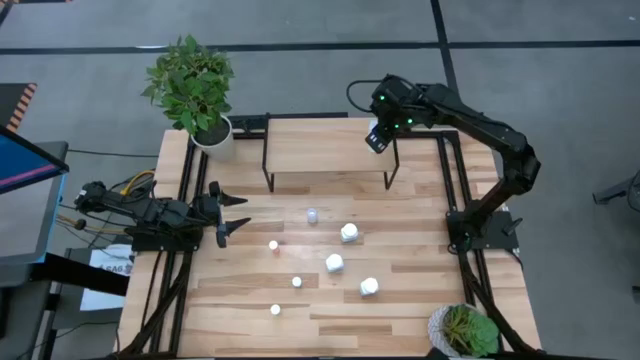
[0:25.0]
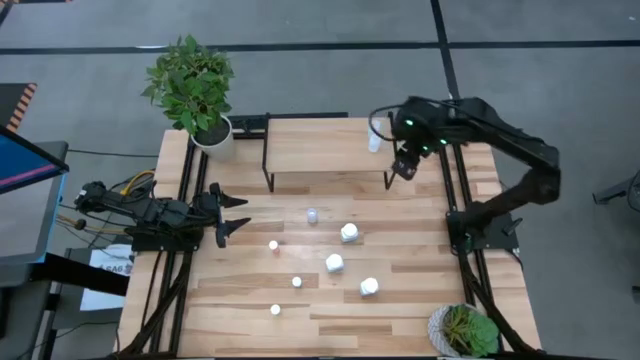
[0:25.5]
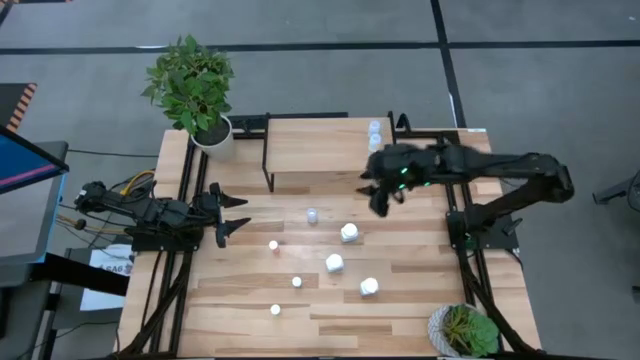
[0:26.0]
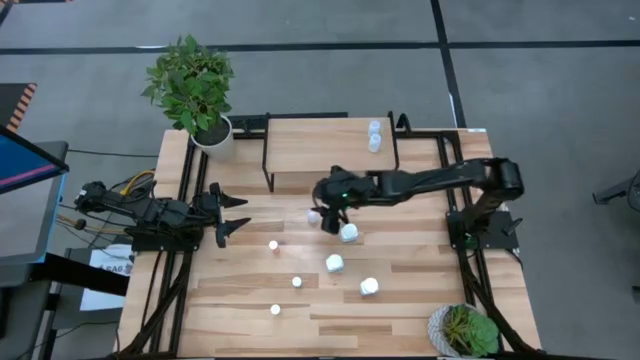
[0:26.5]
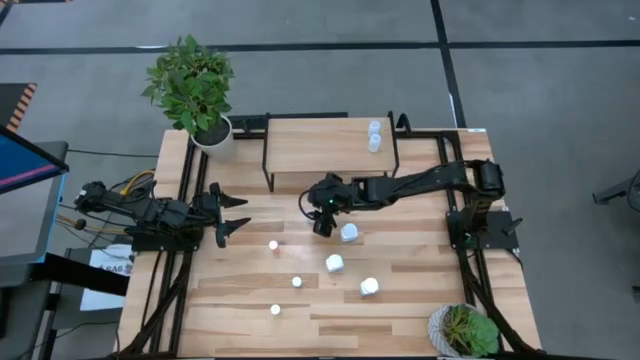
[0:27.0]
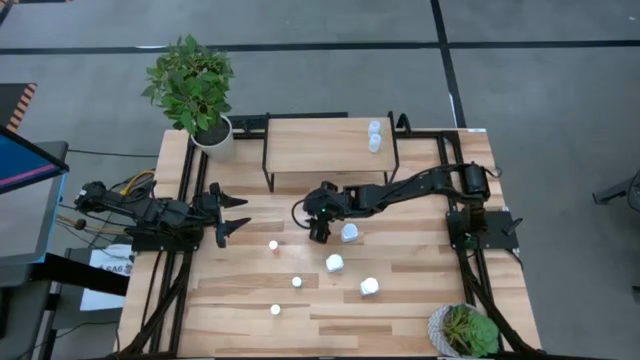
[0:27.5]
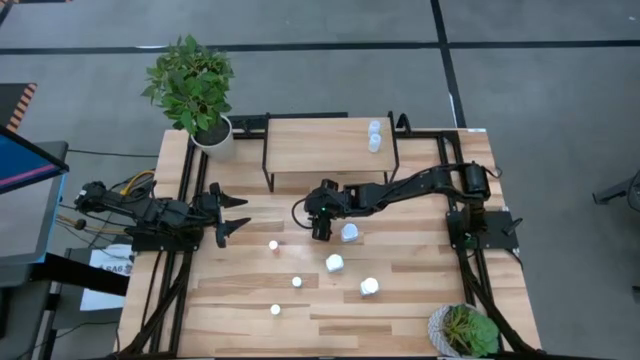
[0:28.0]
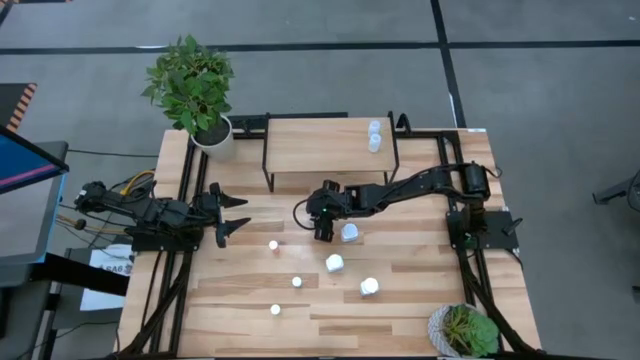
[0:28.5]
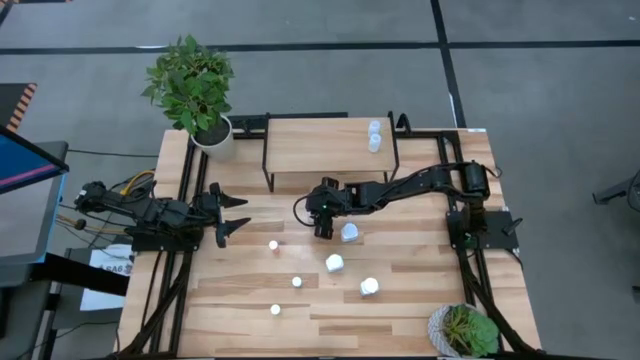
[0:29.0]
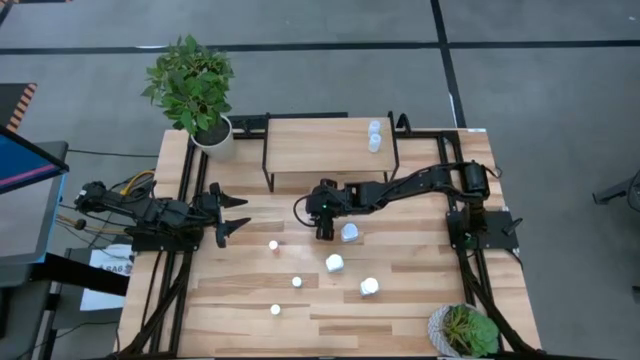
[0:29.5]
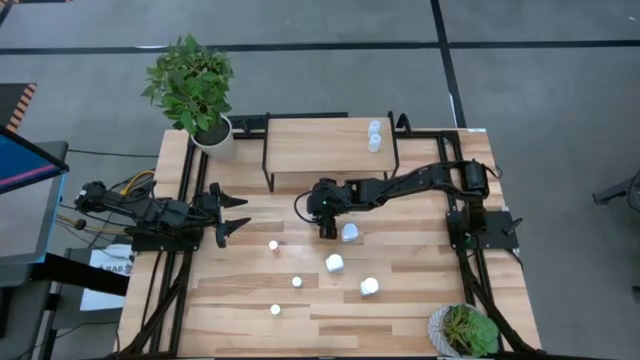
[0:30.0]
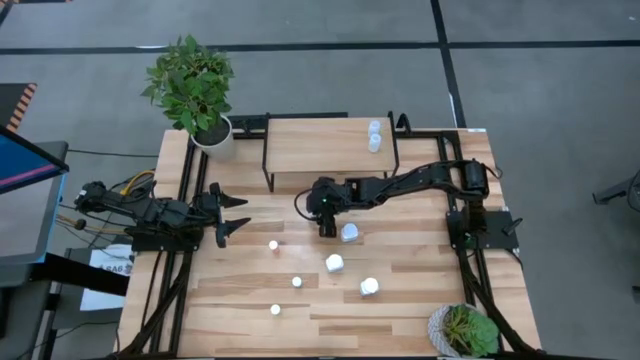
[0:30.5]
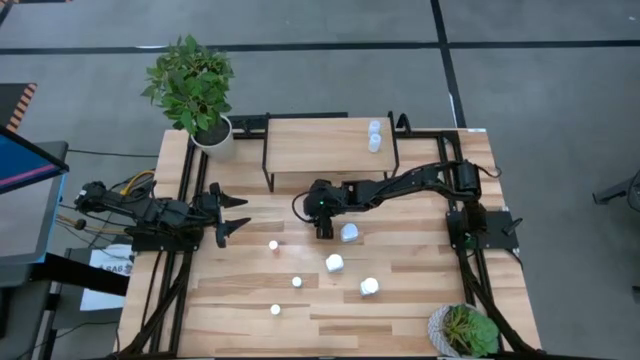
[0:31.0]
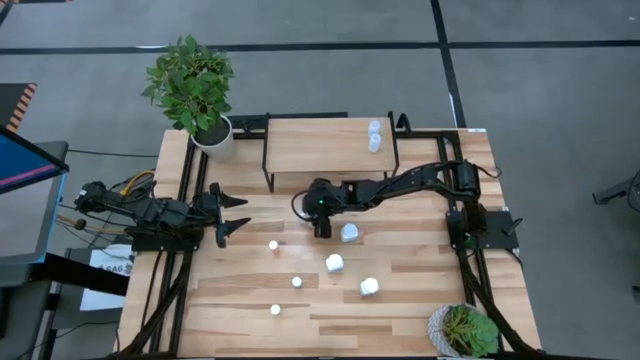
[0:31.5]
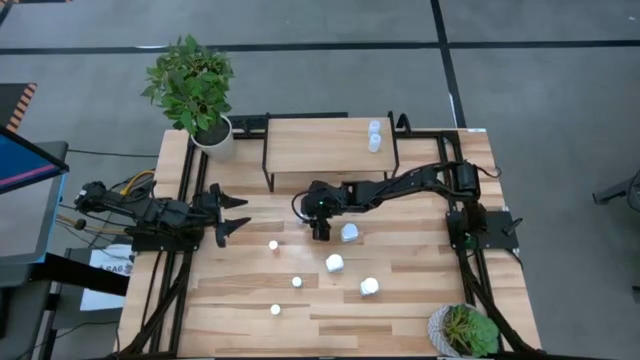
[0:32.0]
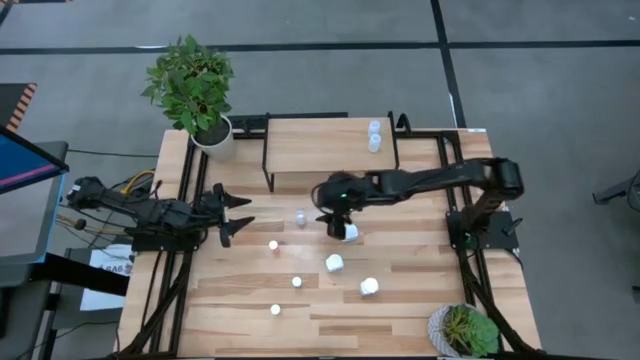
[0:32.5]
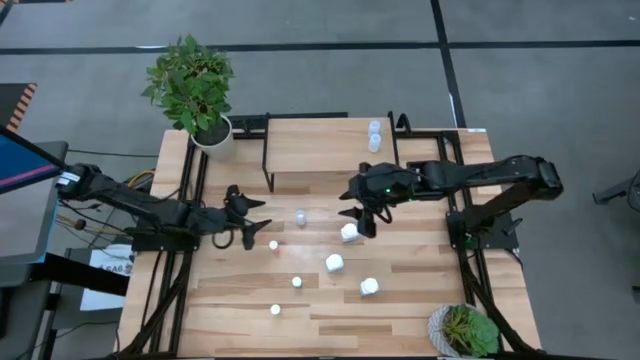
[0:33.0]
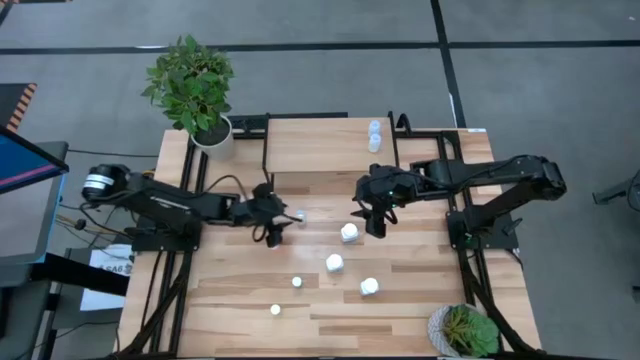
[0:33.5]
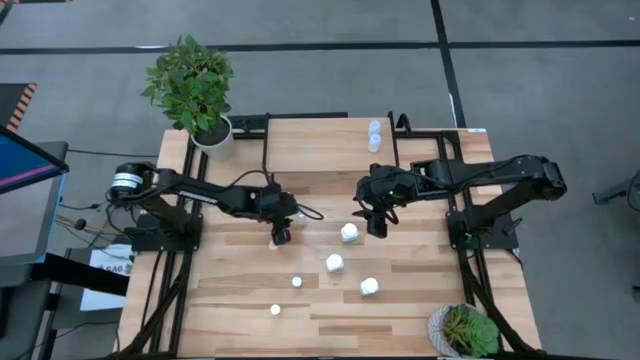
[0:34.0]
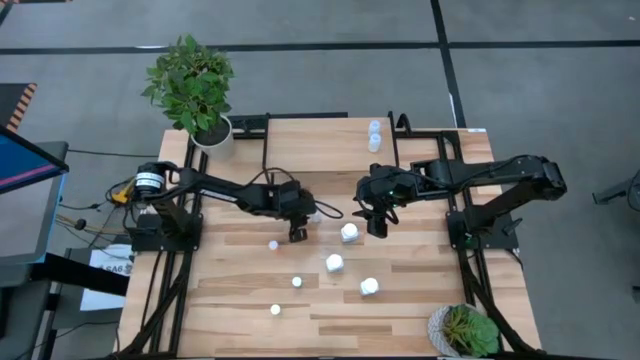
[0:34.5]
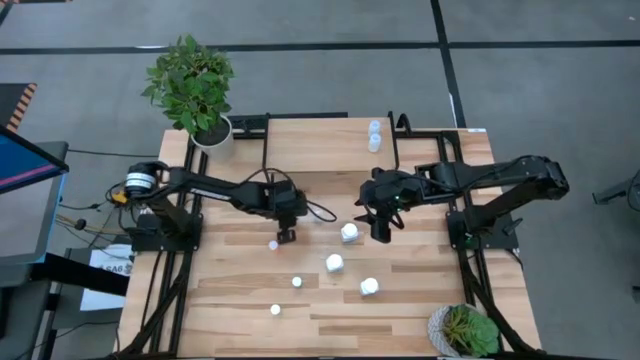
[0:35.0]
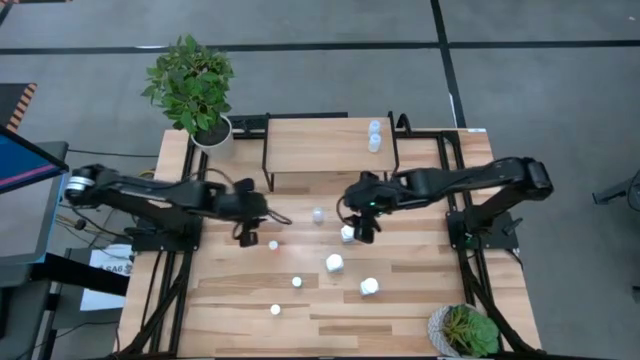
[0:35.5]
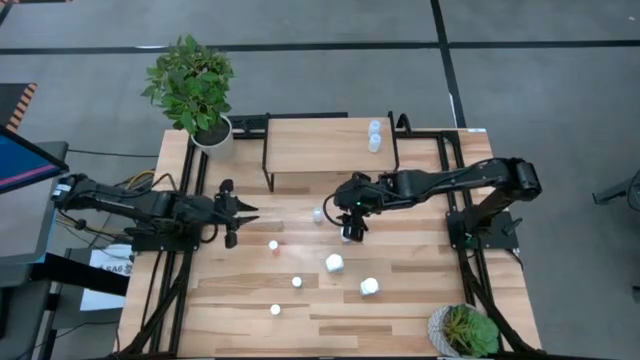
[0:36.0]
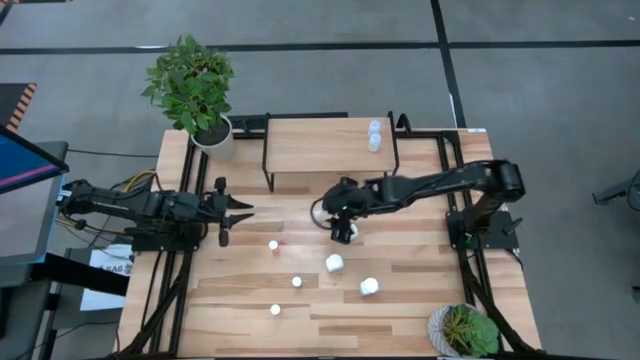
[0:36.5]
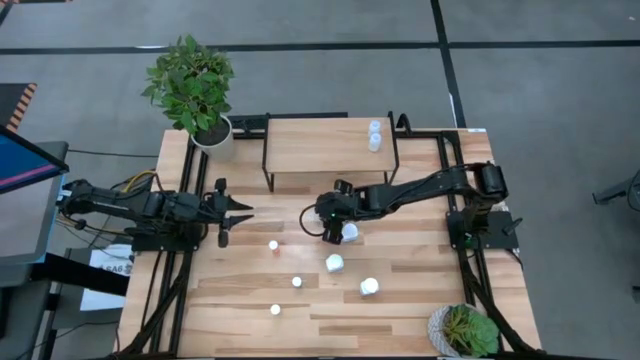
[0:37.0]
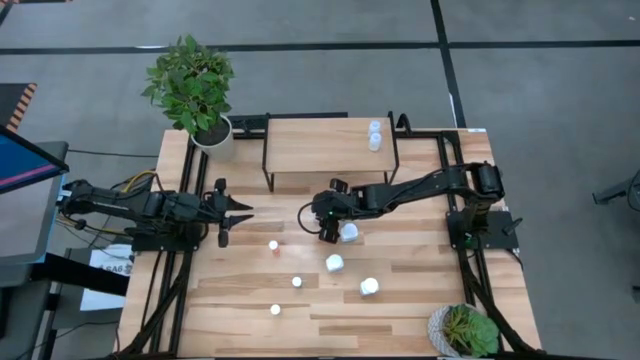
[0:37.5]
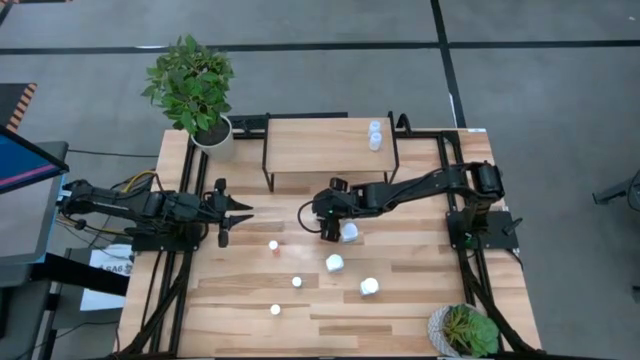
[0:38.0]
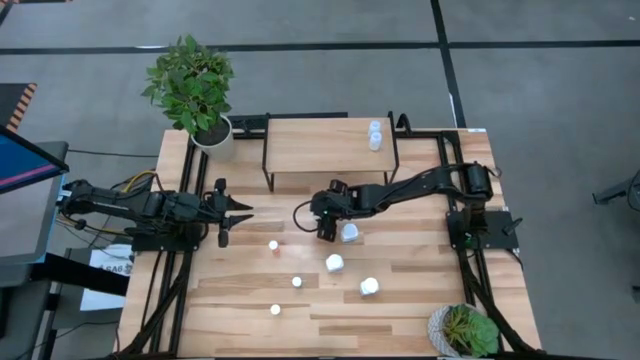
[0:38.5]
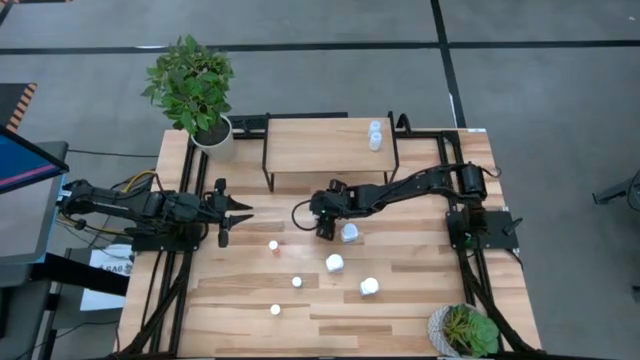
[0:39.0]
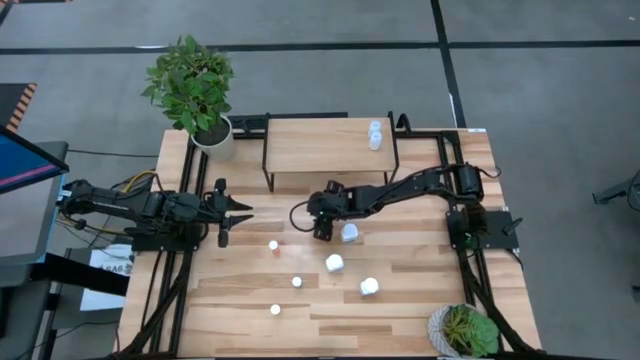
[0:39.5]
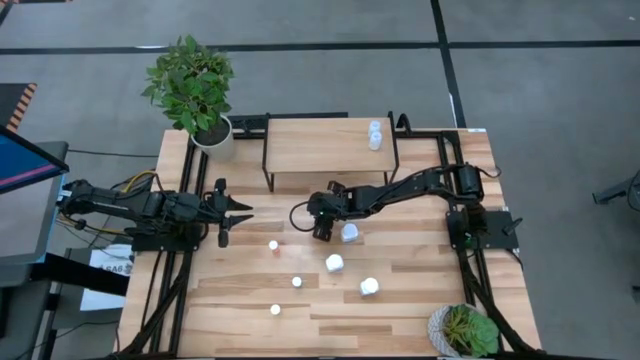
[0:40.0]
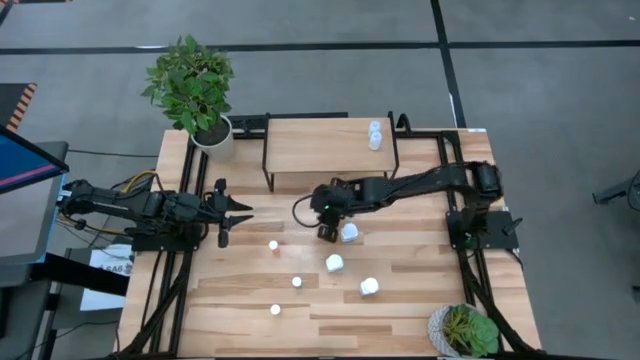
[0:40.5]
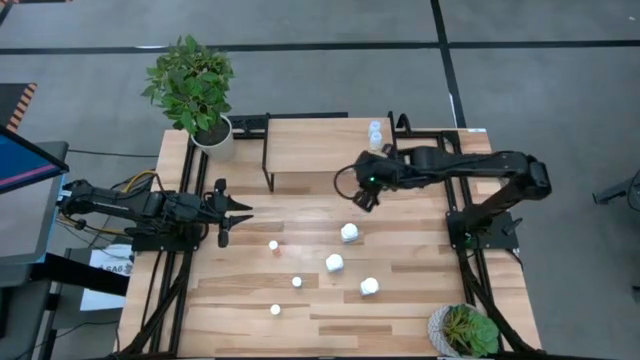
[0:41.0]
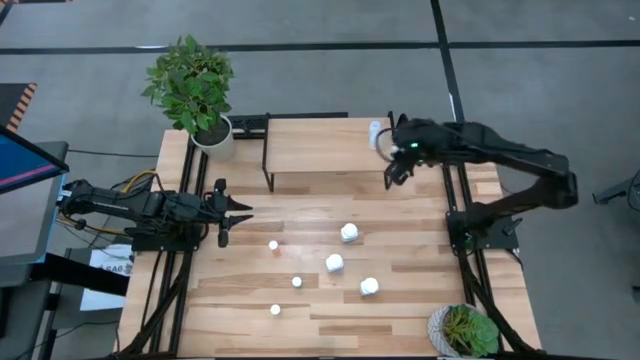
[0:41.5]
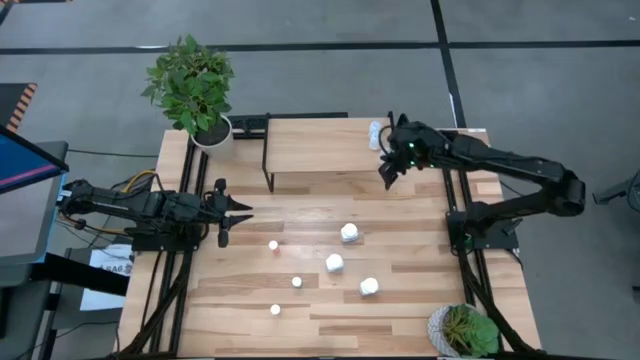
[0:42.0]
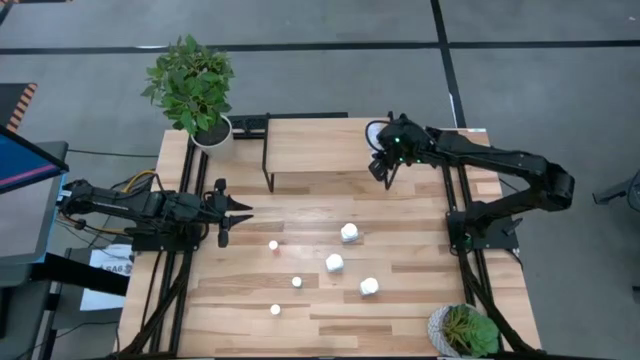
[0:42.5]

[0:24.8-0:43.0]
Task: Pick and place medicine bottles onto shelf by color
Put the transparent medicine bottle on the shelf aligned with the other transparent medicine bottles

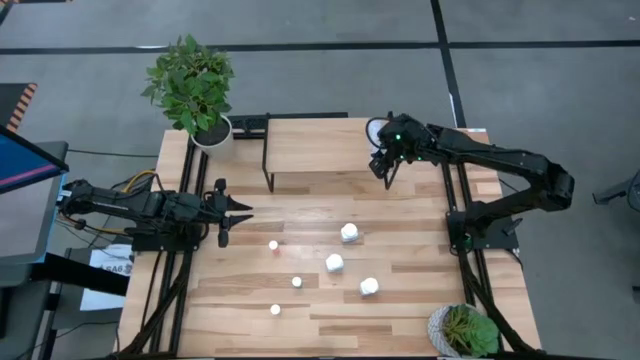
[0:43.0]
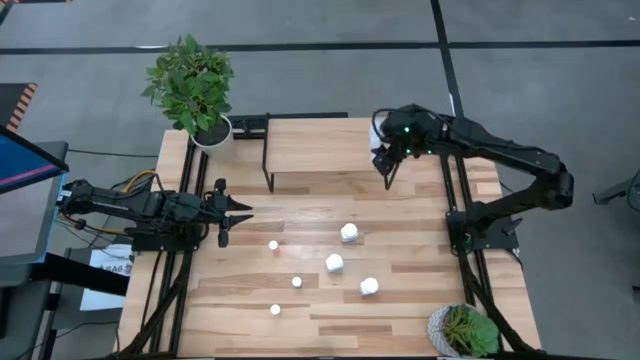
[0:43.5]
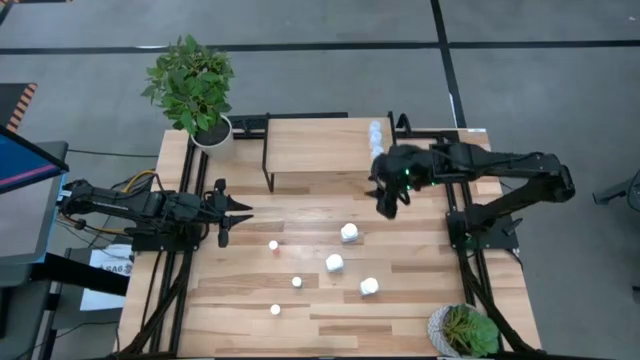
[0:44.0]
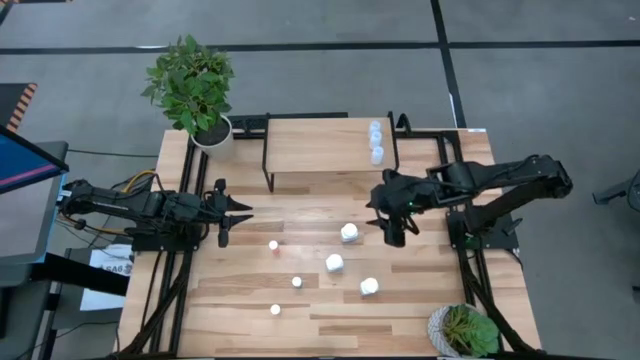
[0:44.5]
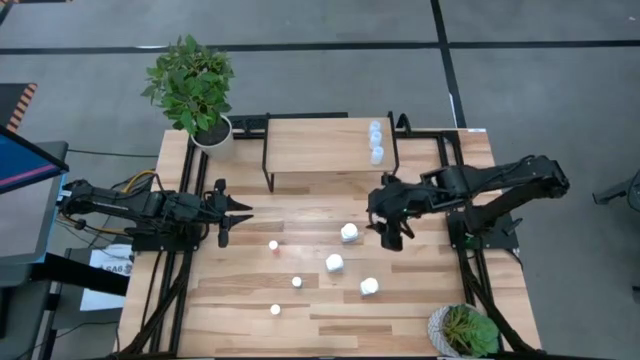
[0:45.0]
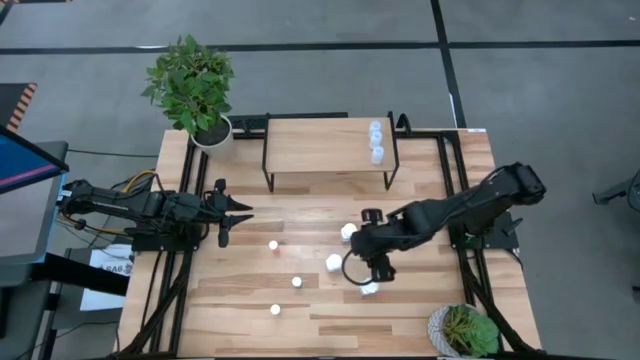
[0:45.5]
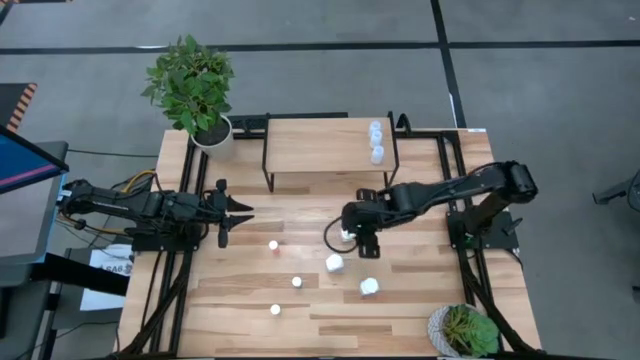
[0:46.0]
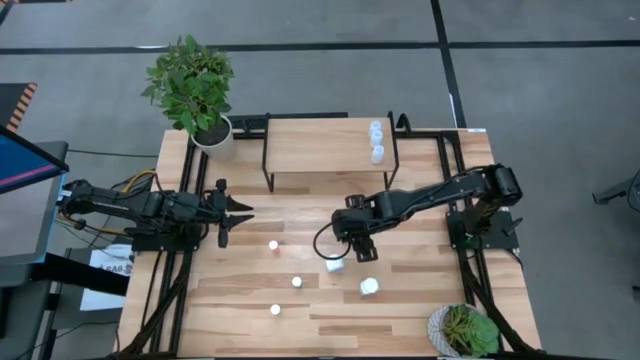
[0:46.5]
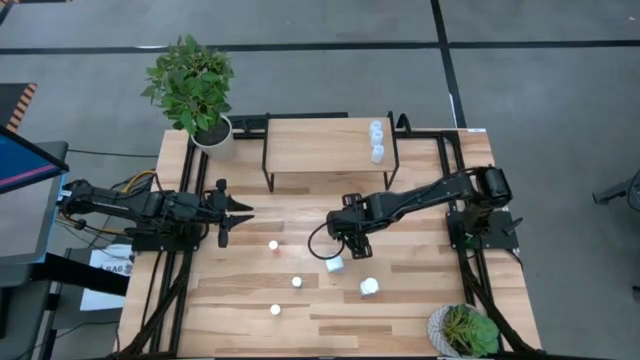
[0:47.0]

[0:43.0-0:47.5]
Put the top white medicine bottle on the shelf
